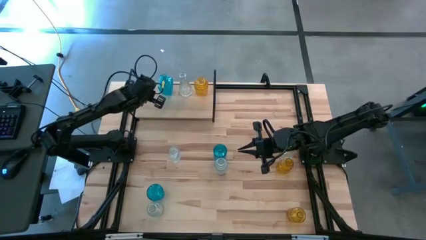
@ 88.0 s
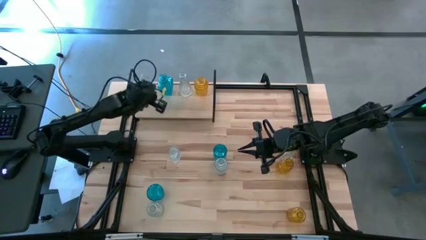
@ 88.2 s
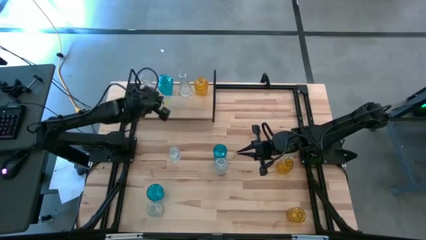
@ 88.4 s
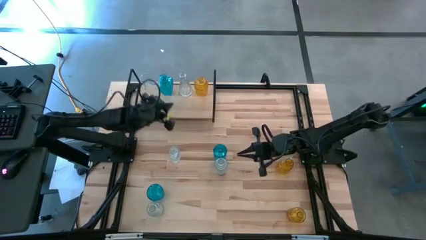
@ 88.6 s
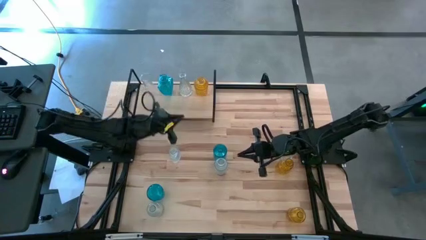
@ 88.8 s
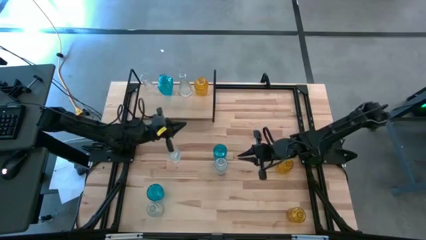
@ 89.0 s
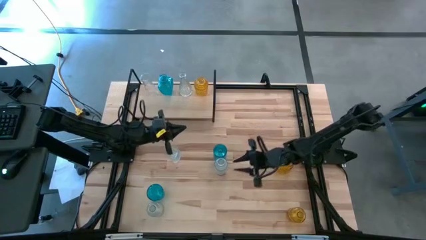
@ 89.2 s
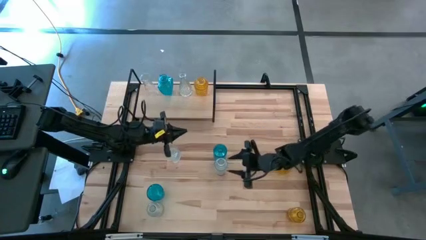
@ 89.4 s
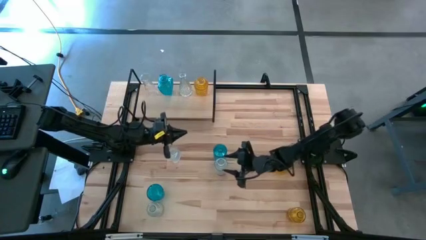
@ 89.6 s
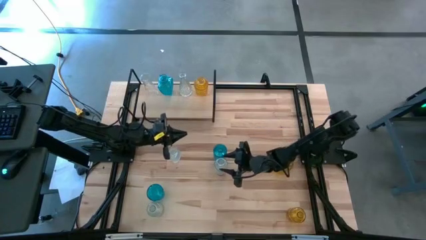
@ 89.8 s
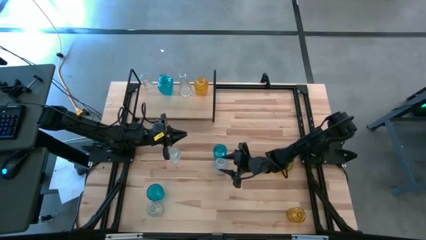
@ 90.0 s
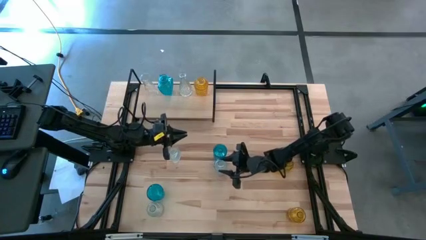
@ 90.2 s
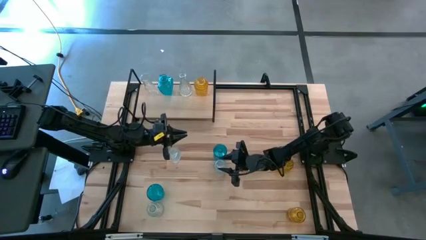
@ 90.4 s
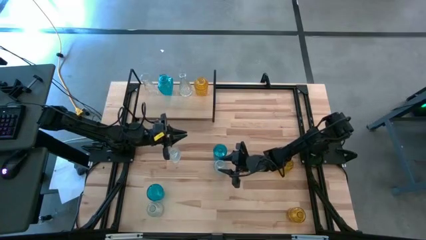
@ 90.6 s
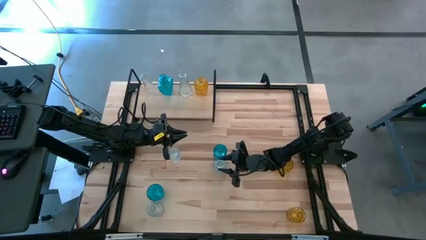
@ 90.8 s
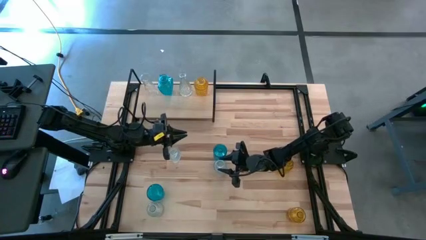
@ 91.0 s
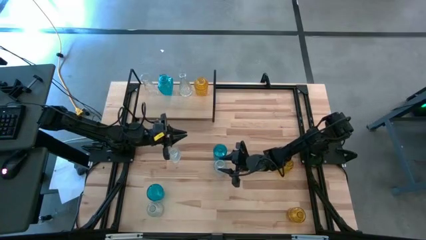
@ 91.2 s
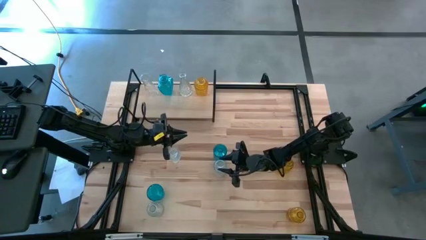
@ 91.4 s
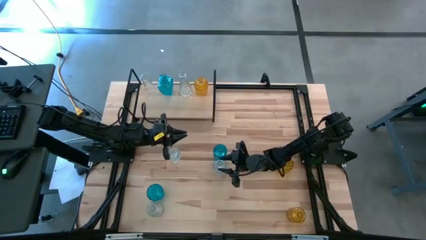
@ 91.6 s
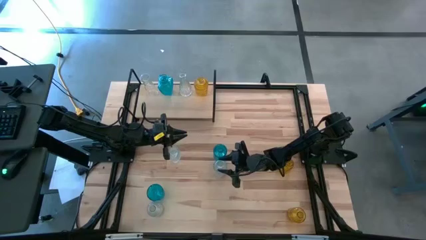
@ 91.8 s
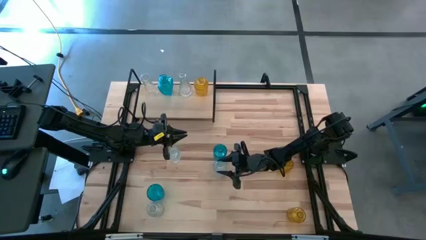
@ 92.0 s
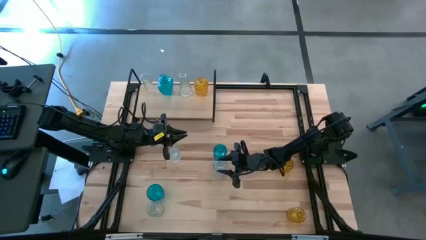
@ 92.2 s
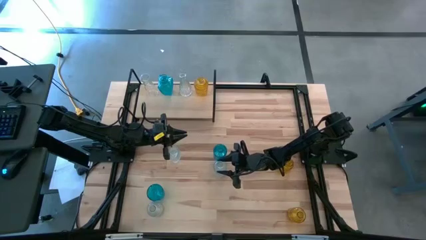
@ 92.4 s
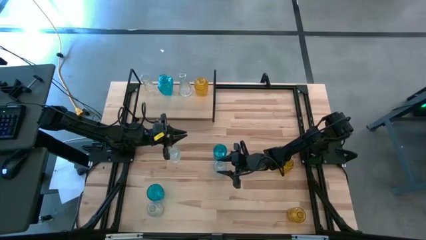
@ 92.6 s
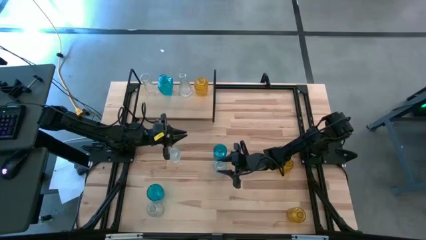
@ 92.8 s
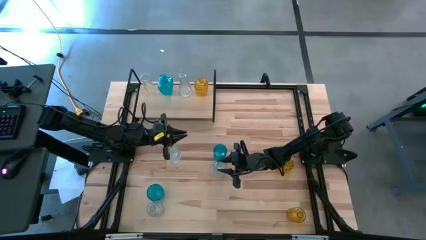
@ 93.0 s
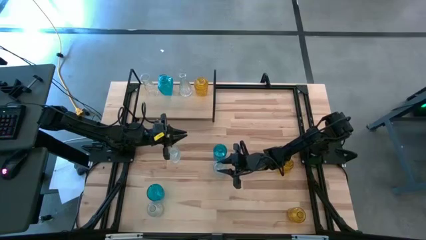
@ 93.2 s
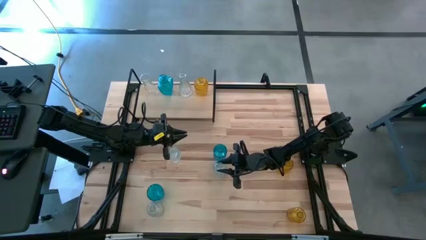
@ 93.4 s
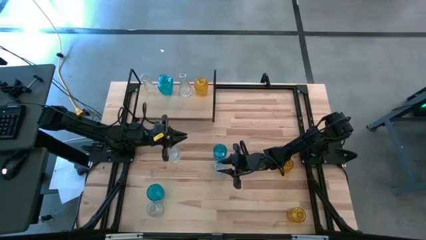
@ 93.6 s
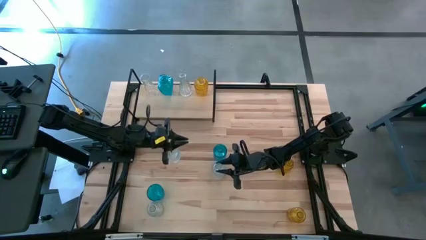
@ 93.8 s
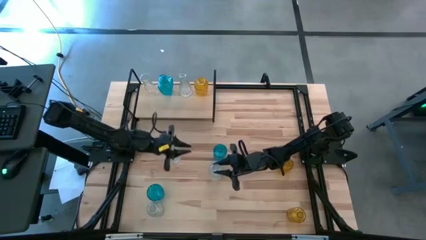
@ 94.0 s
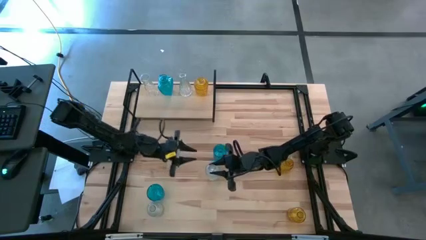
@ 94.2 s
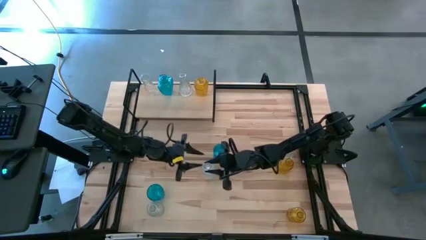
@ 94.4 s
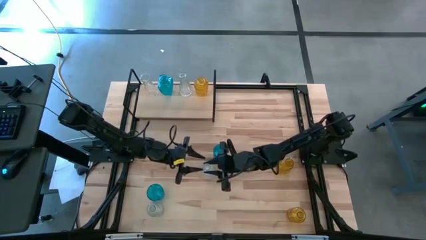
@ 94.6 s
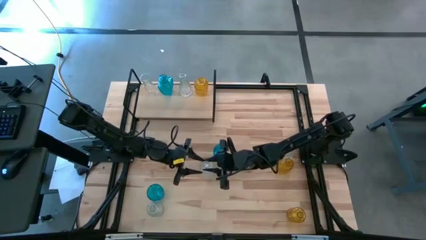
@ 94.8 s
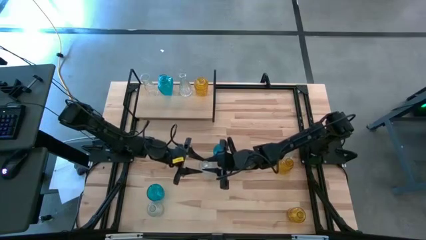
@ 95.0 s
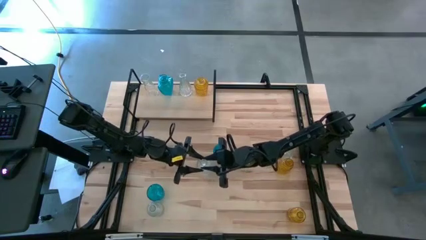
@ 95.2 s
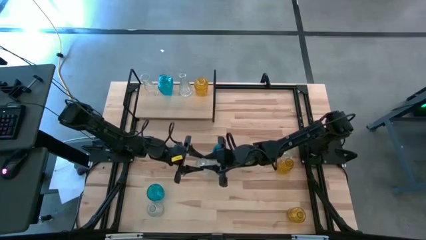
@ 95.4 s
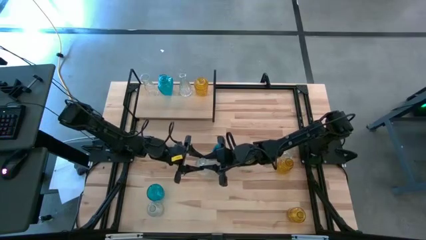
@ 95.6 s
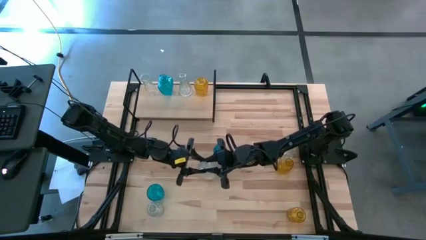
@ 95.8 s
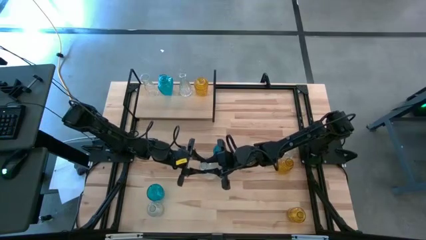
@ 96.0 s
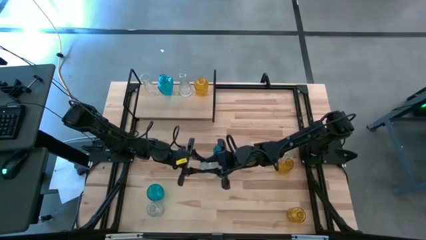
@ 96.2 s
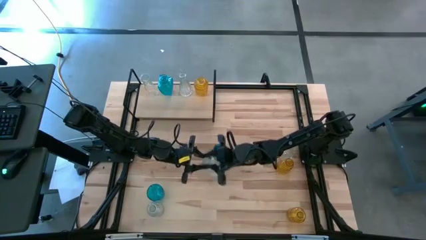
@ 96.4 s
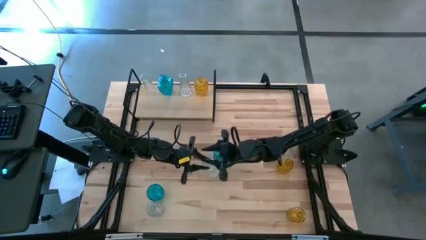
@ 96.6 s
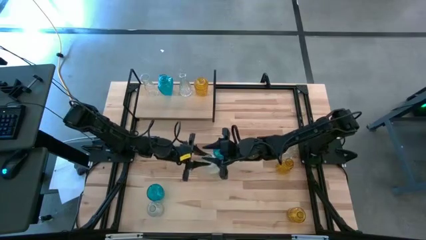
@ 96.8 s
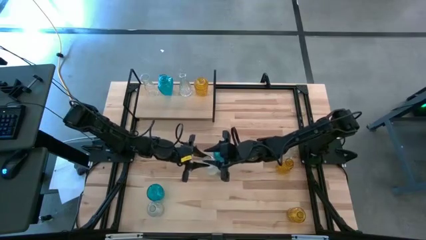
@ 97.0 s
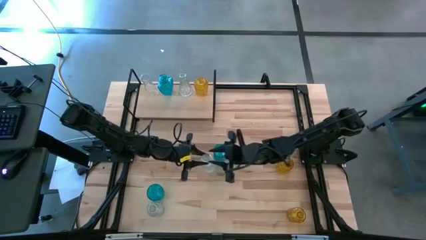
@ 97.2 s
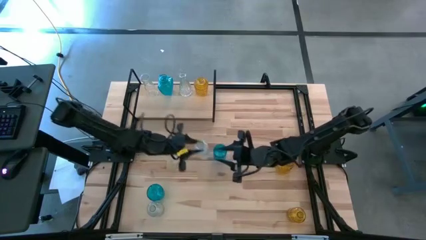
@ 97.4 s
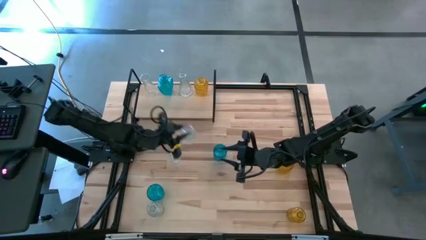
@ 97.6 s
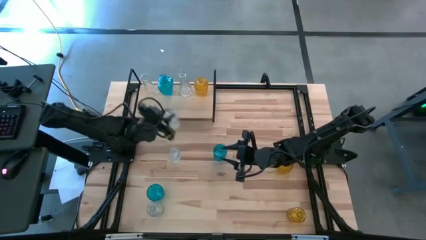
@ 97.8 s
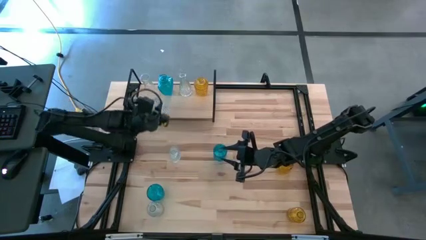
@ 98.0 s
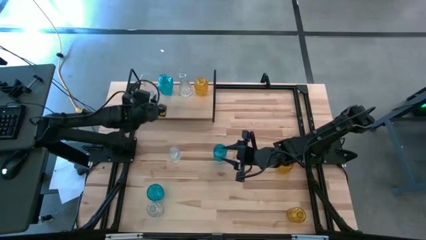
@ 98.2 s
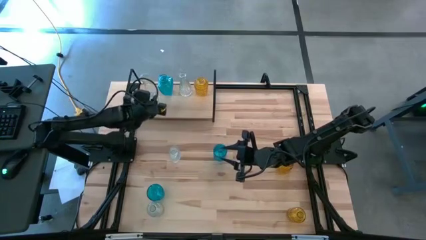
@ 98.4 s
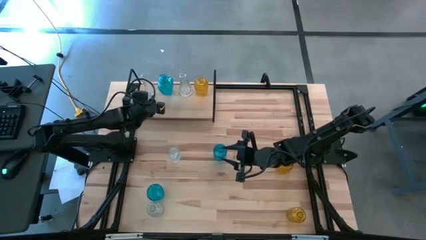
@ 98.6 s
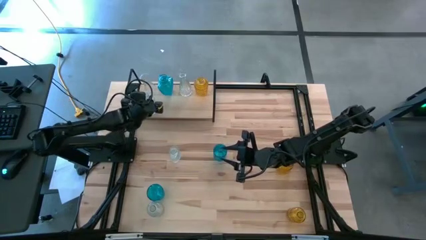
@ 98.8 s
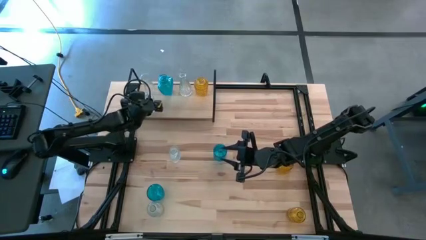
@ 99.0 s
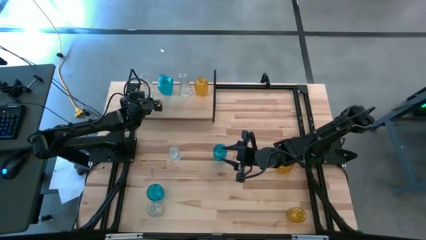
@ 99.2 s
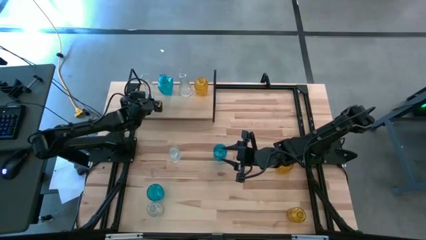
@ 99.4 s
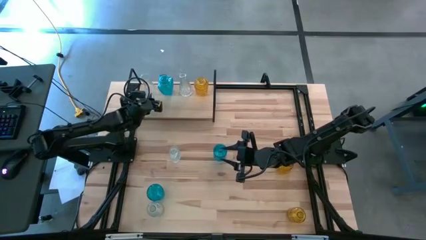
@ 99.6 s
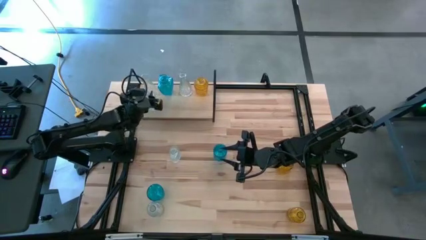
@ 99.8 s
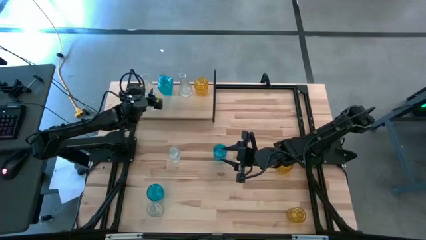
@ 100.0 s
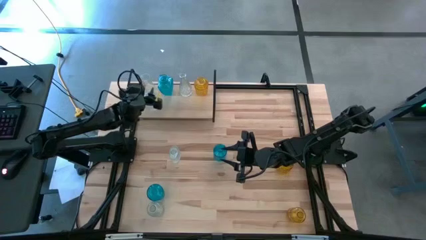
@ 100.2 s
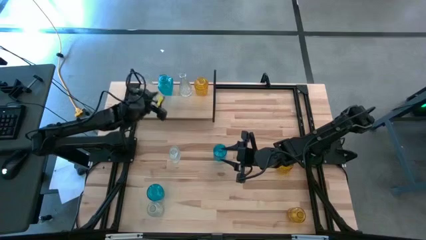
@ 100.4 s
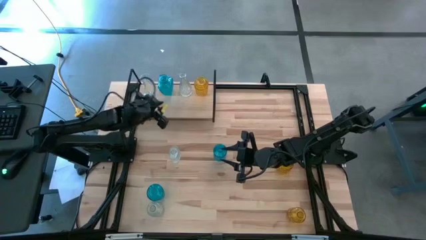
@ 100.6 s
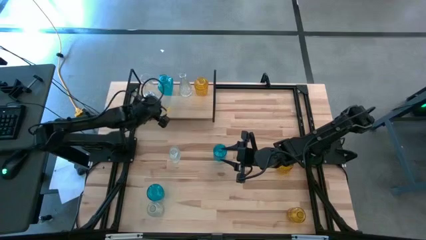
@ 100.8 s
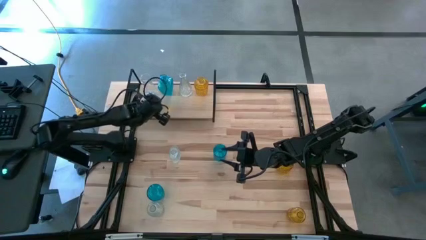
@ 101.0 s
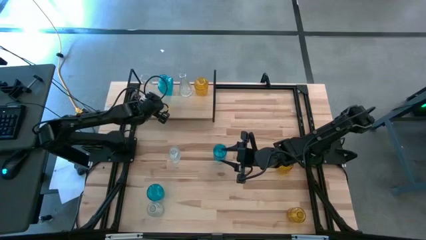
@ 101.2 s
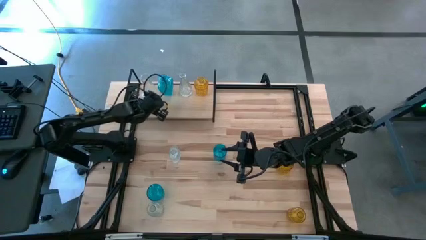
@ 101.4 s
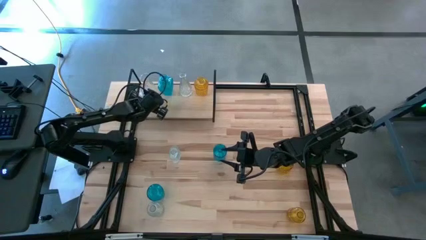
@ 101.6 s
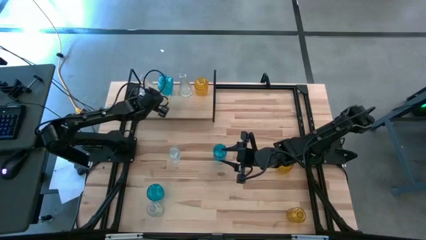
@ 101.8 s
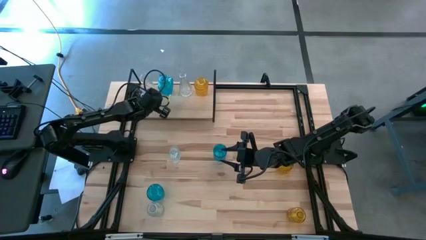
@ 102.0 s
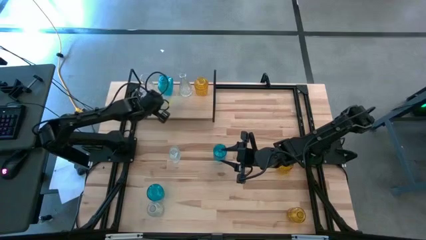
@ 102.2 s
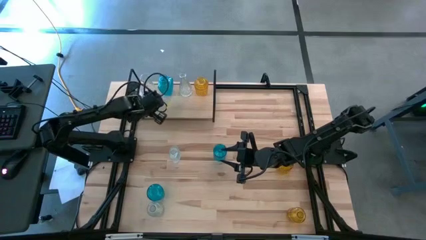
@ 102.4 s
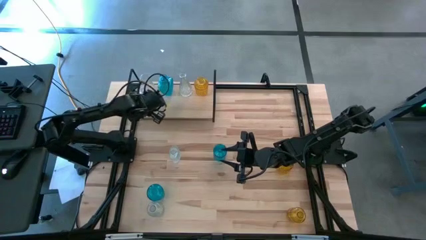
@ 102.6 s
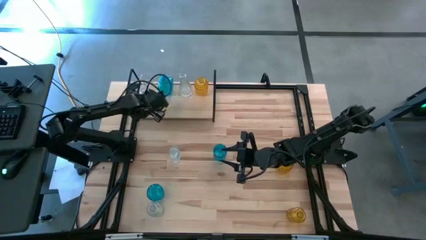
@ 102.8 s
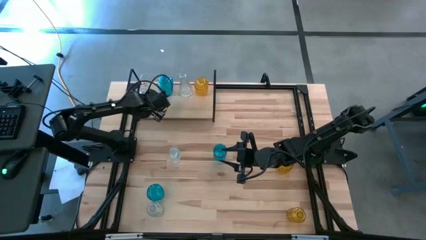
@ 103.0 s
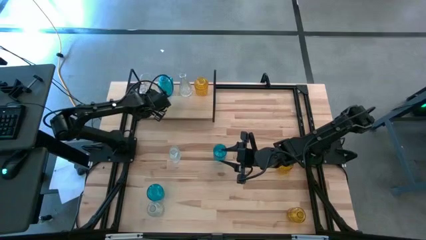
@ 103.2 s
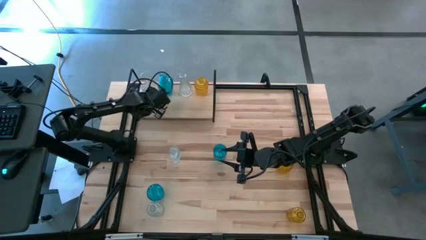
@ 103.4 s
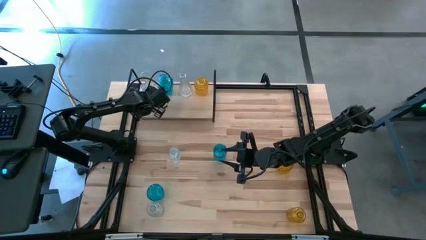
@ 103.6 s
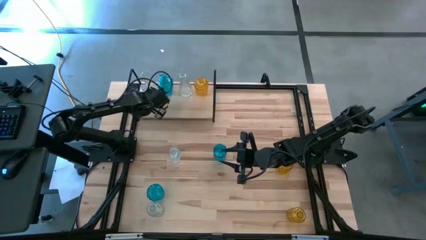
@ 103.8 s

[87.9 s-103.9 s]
Task: sort vases onto shelf
Put the transparent vase on the shelf aligned with the other transparent vase
